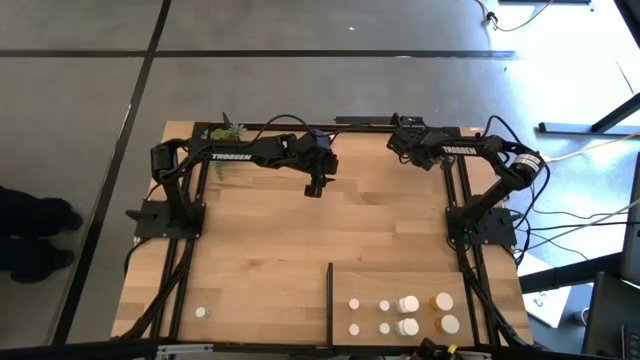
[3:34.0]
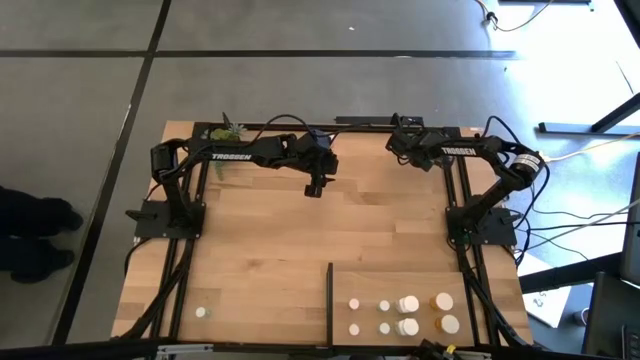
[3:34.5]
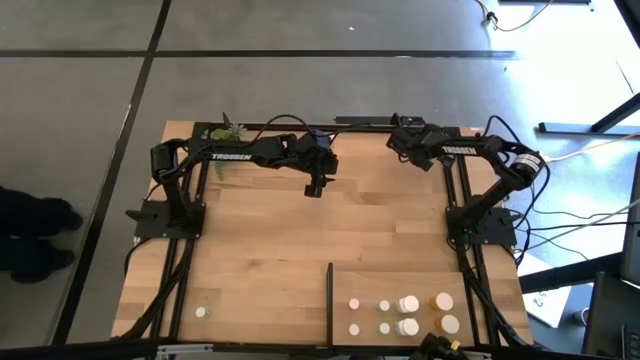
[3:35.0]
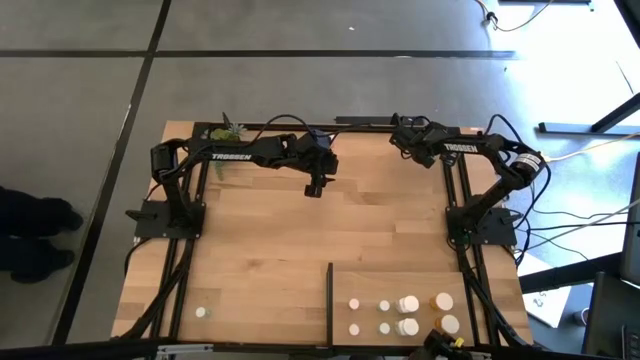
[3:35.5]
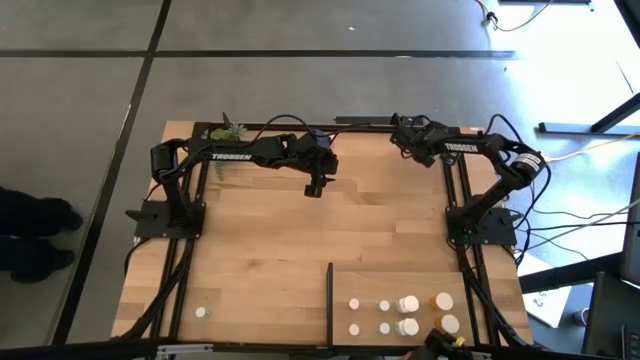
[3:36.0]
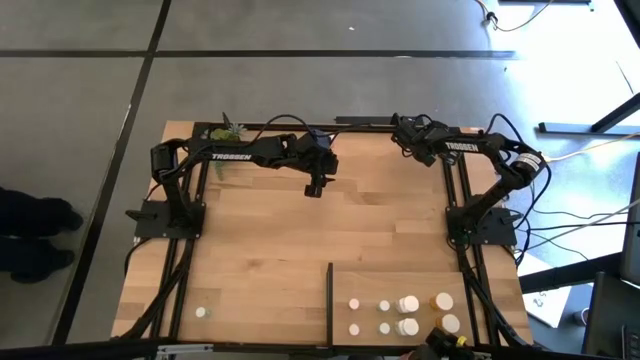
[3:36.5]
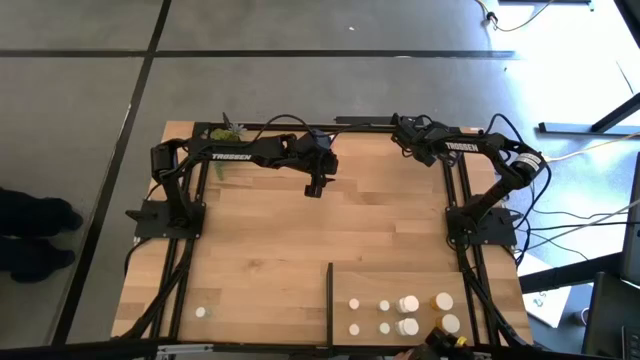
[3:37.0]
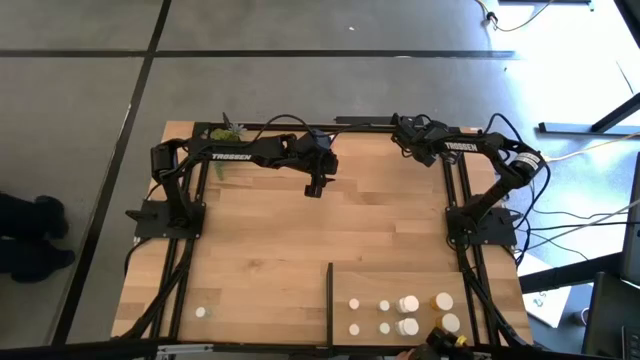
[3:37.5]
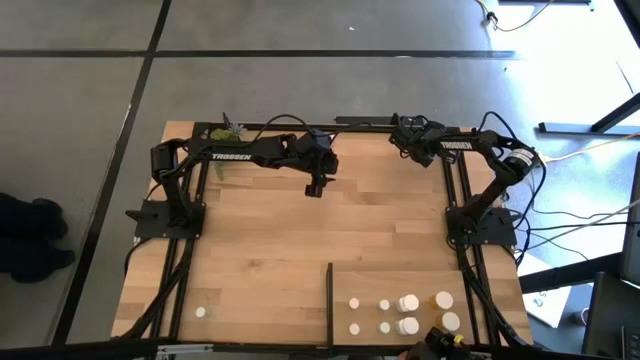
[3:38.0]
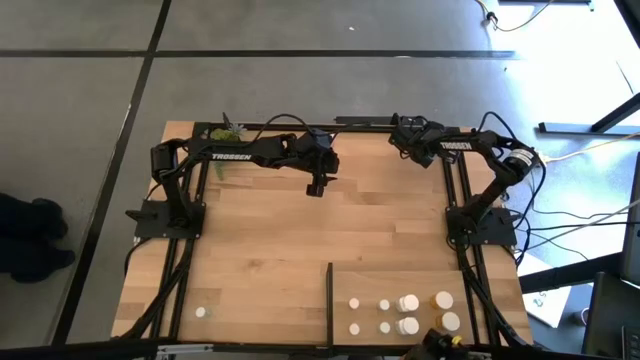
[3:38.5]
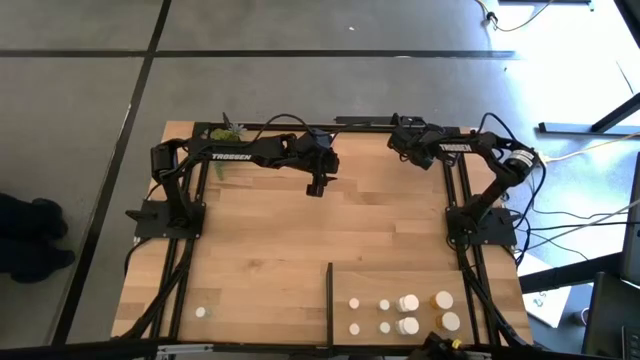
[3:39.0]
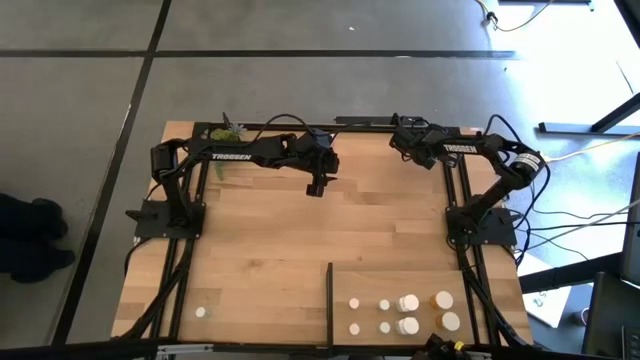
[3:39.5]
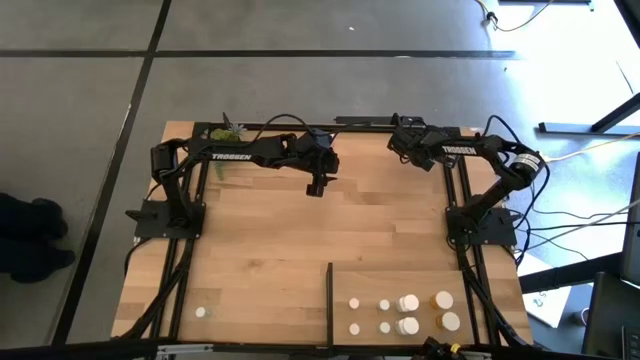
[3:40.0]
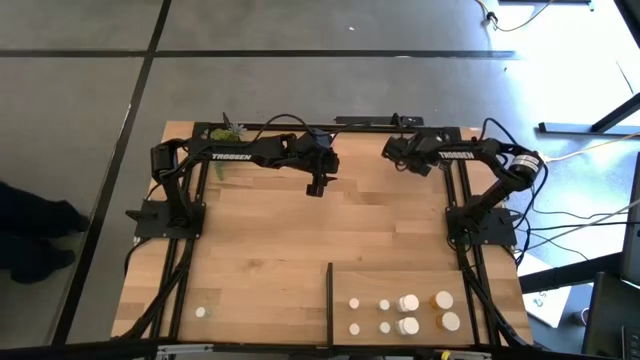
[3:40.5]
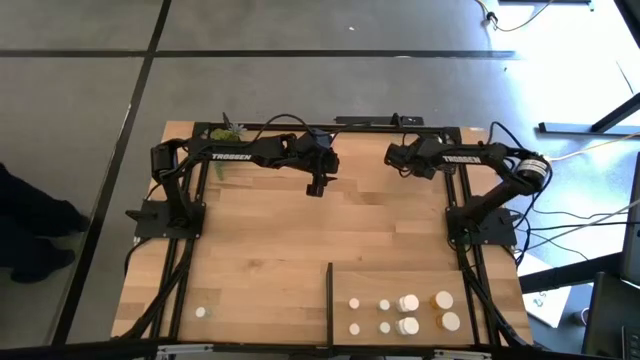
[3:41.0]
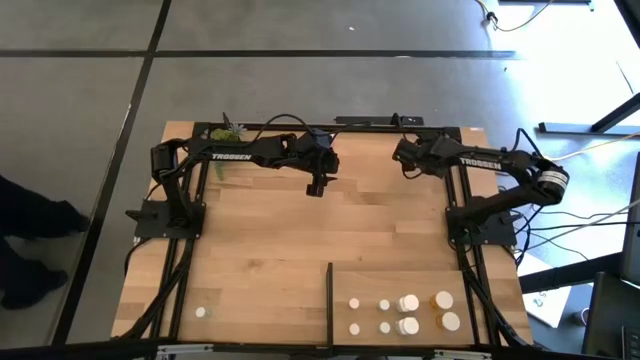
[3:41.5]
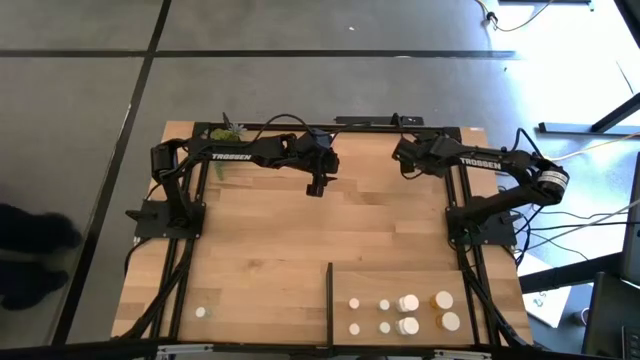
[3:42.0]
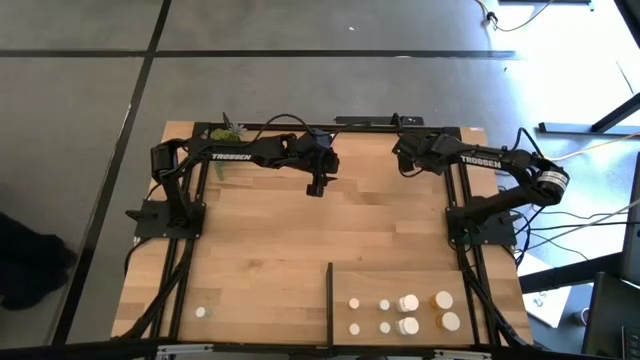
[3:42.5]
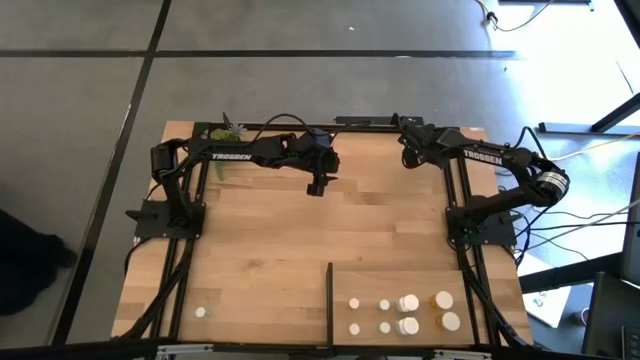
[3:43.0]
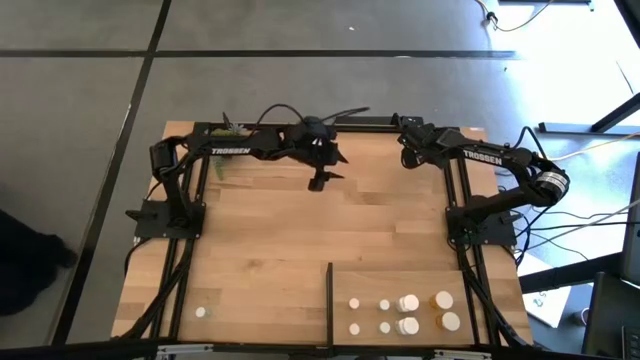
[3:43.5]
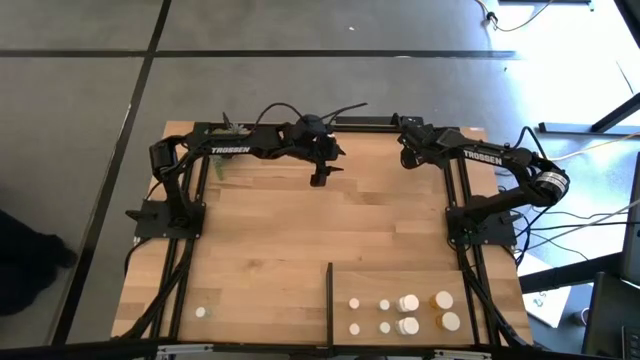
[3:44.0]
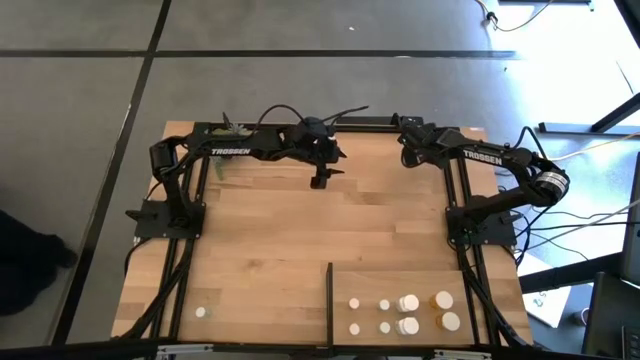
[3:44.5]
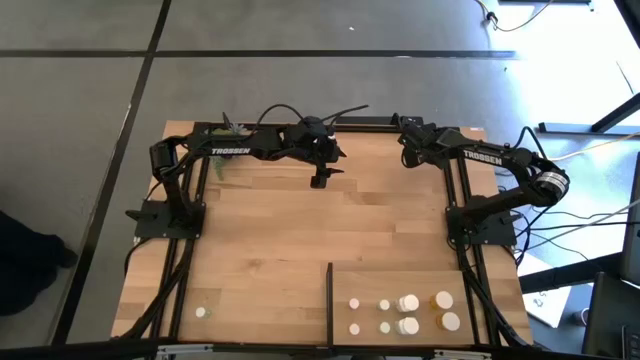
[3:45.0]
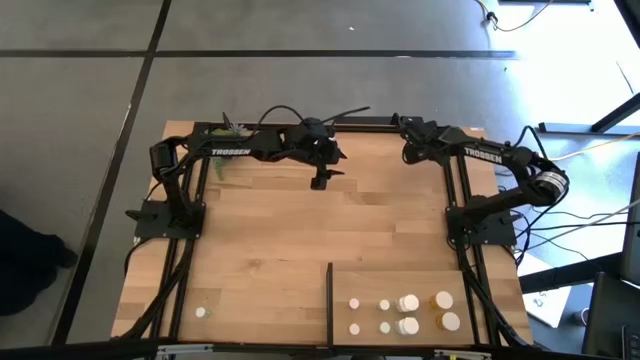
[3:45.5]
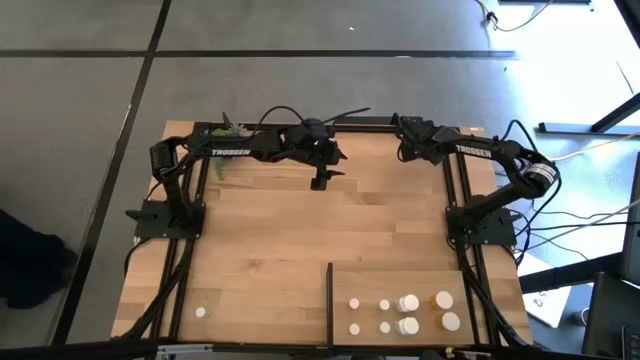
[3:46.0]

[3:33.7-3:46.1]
Task: Pick and place medicine bottles onto shelf by color
Put the white pill bottle on the shelf aligned with the other white pill bottles

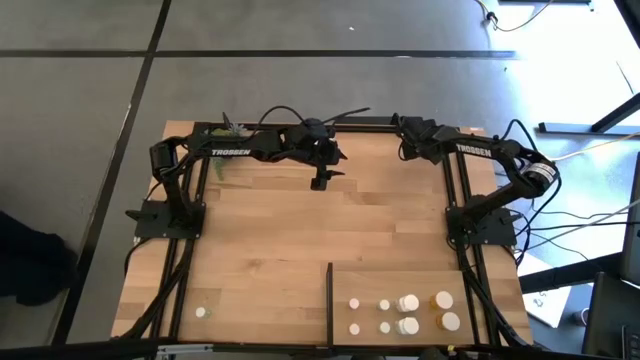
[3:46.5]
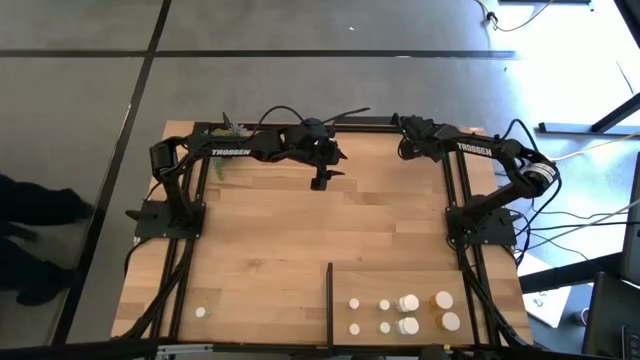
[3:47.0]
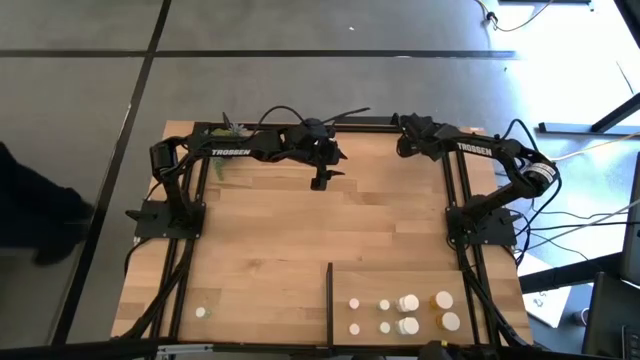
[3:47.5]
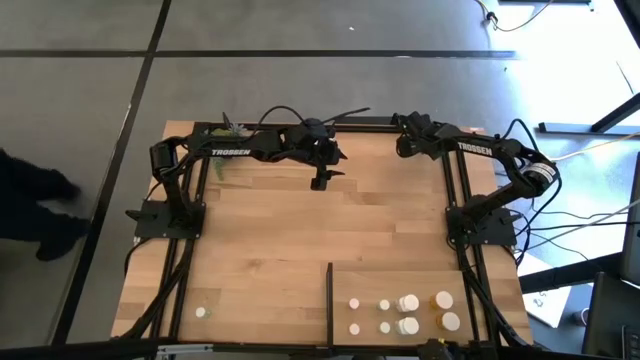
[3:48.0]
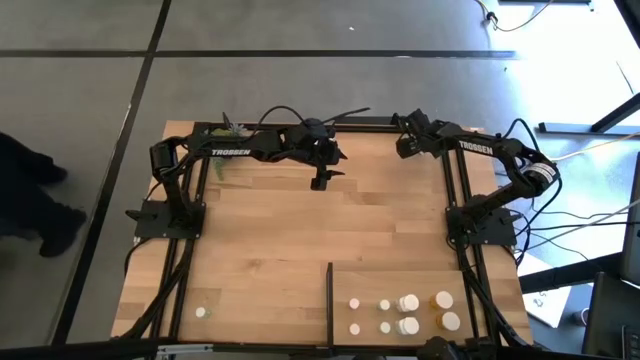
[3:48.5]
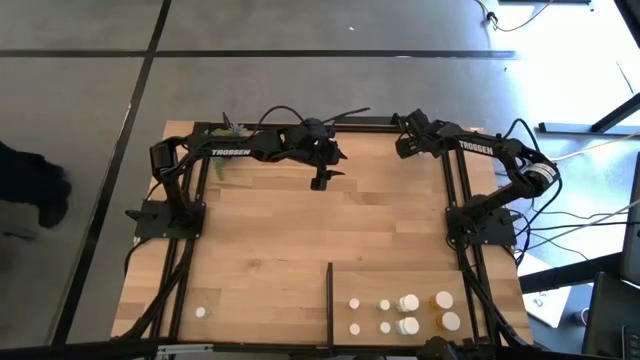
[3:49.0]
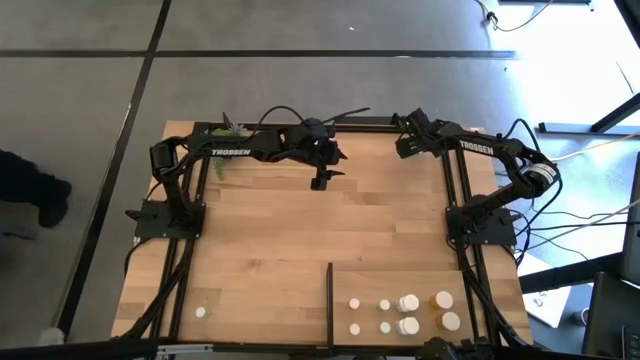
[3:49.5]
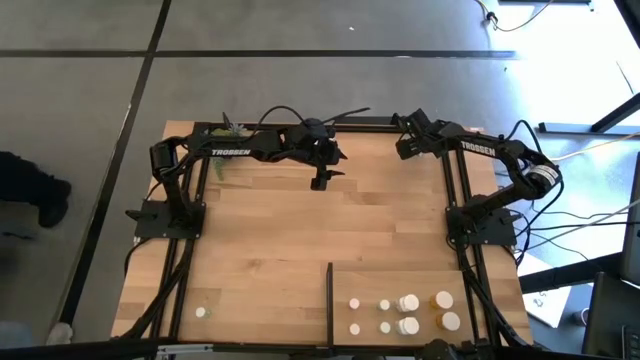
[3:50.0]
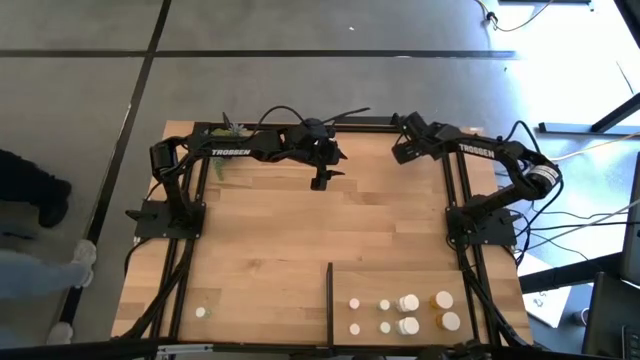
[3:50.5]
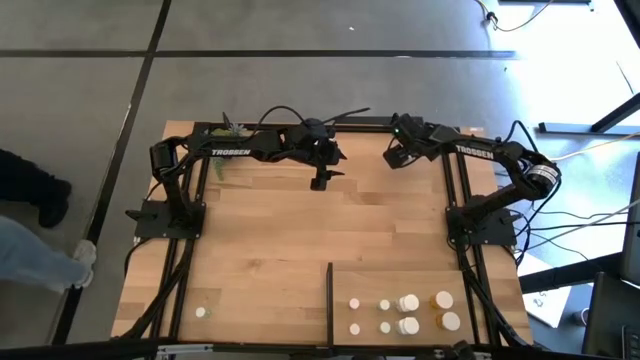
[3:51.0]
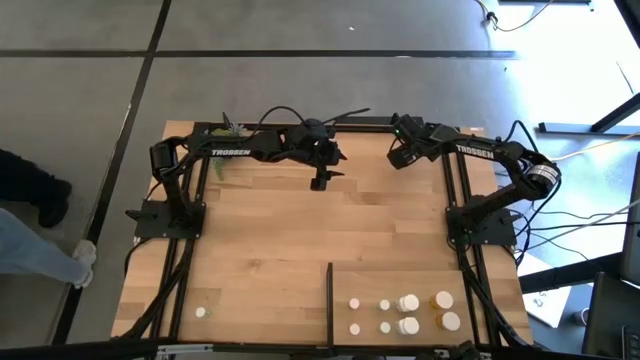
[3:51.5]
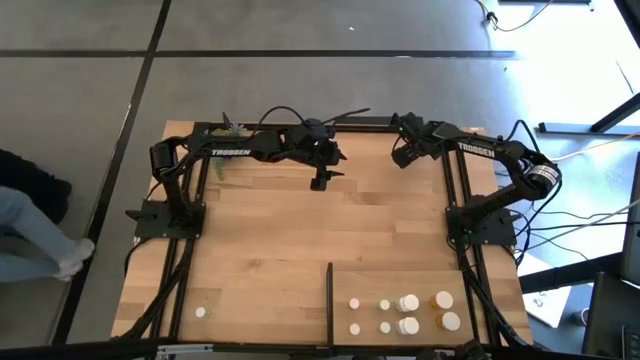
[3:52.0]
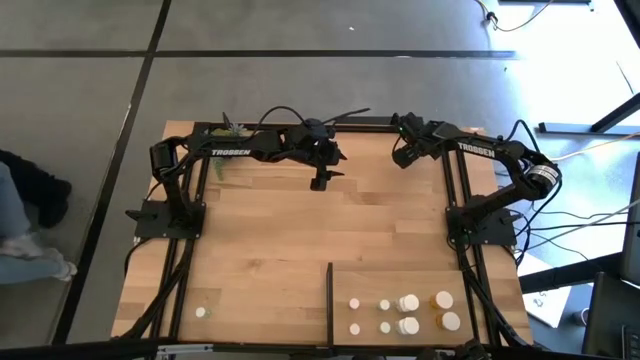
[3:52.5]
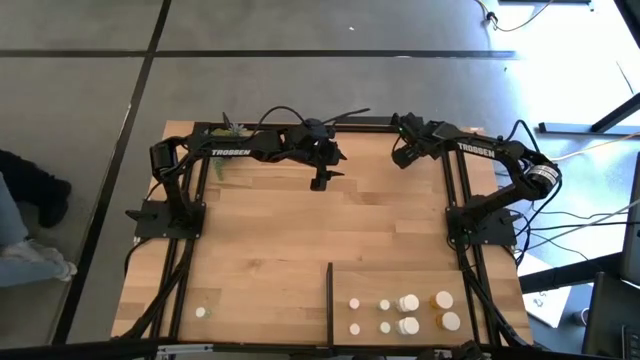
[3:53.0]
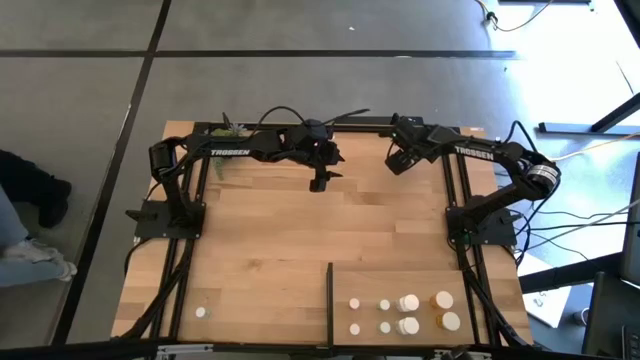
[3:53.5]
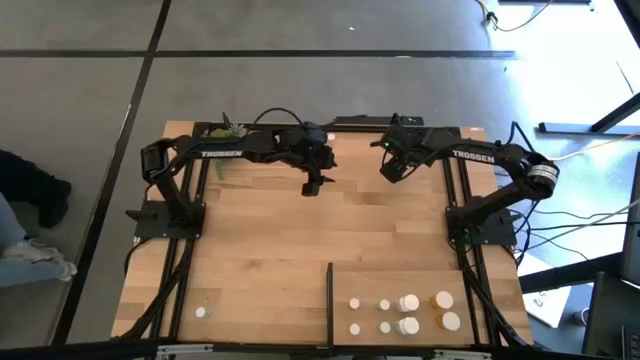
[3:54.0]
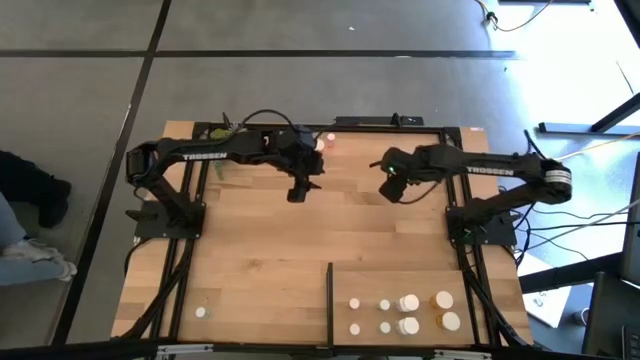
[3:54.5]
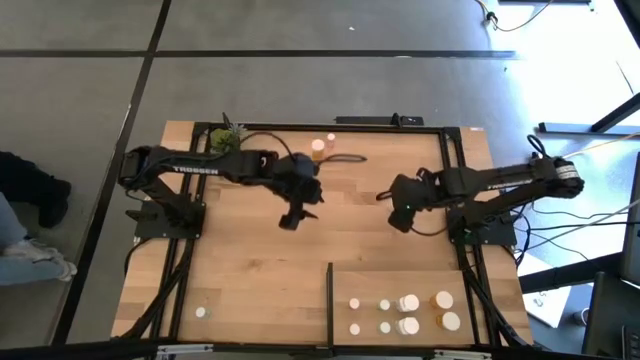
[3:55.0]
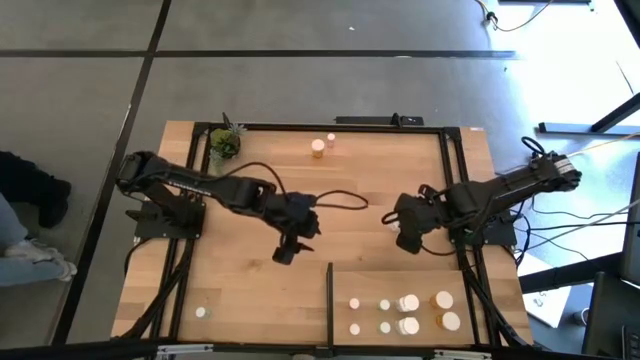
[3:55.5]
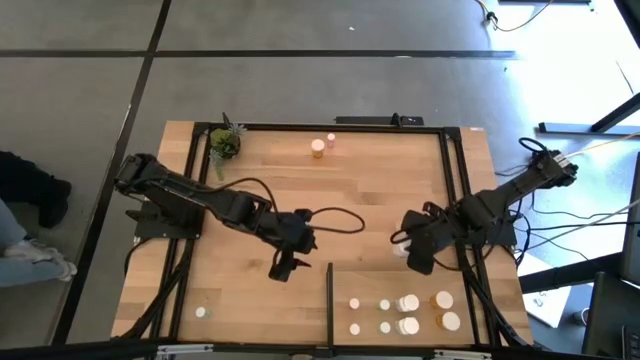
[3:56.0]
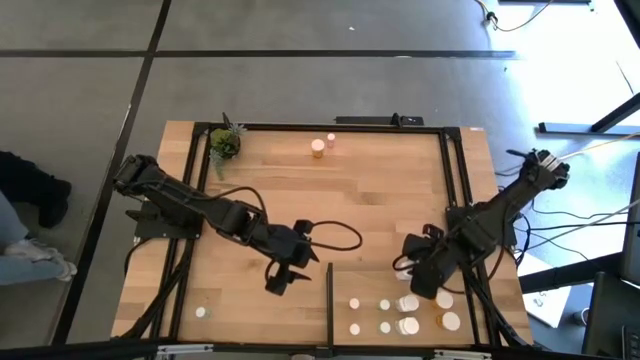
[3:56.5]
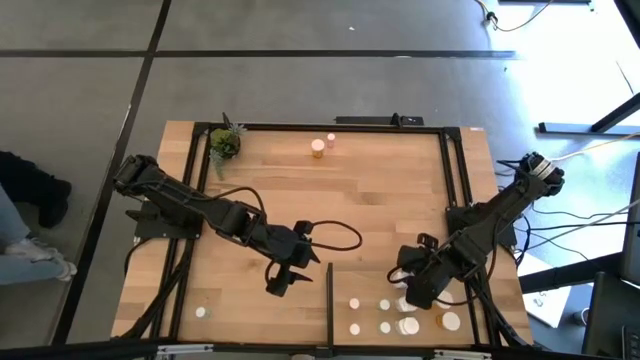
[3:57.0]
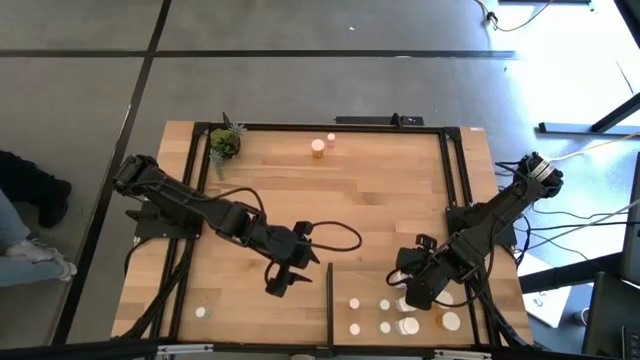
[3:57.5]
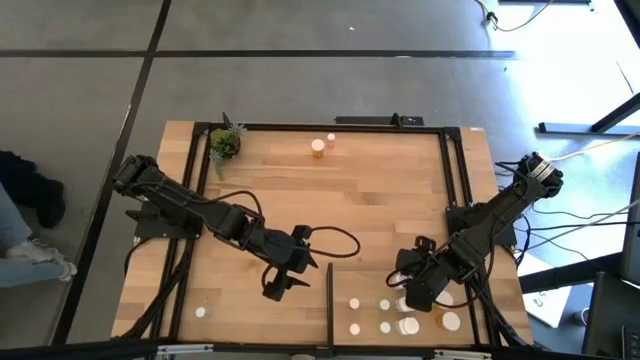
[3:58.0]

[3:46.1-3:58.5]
Put the white pill bottle on the shelf aligned with the other white pill bottles
